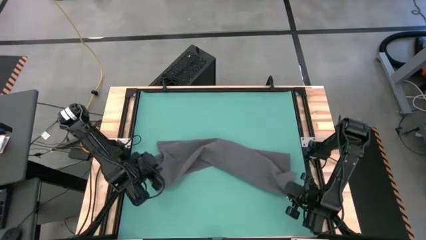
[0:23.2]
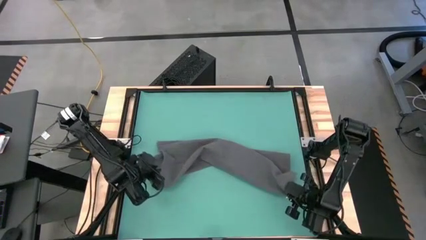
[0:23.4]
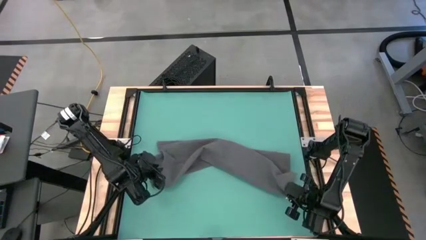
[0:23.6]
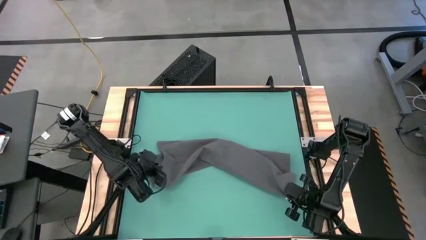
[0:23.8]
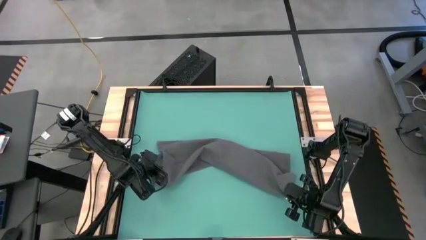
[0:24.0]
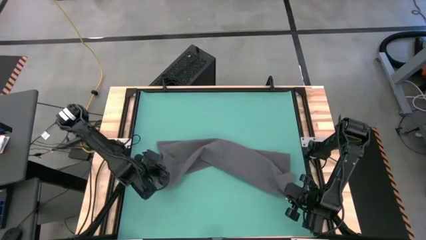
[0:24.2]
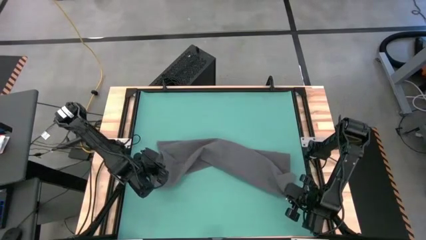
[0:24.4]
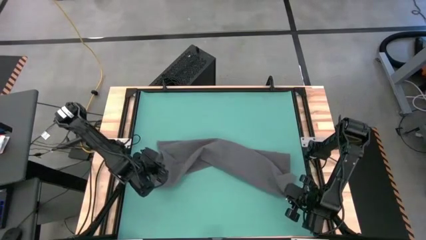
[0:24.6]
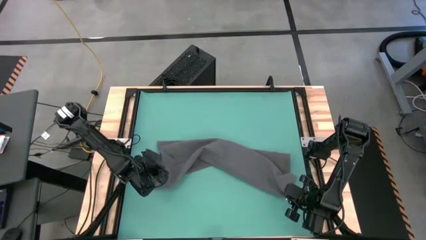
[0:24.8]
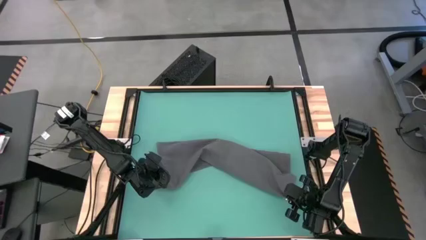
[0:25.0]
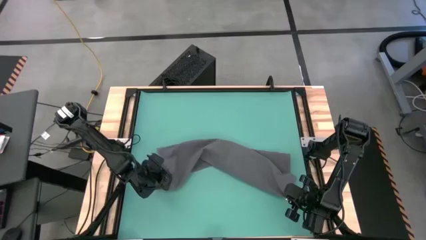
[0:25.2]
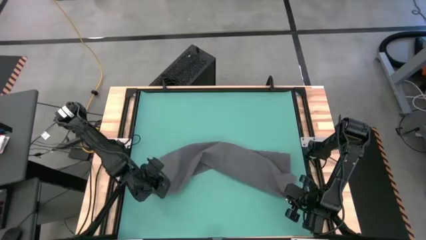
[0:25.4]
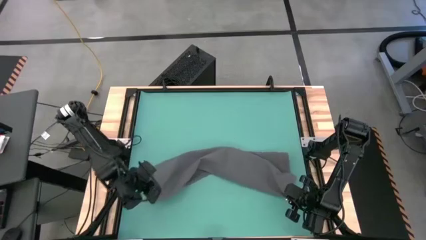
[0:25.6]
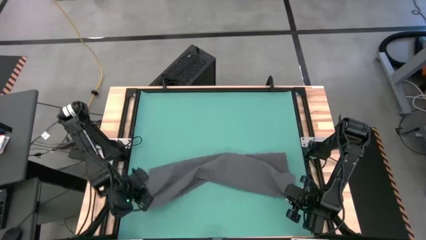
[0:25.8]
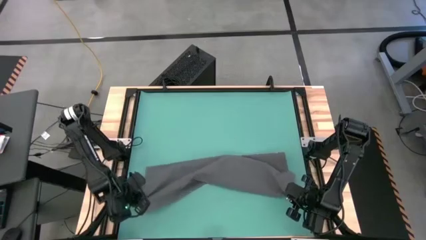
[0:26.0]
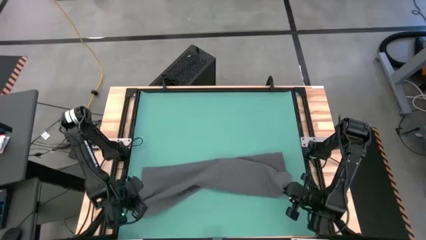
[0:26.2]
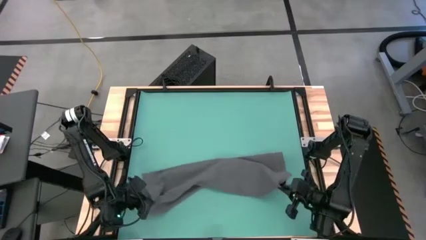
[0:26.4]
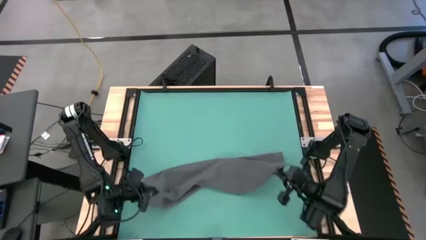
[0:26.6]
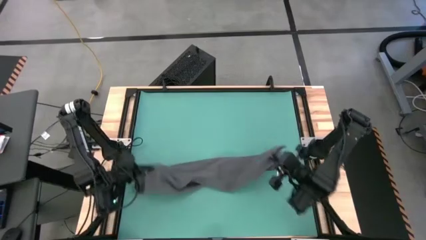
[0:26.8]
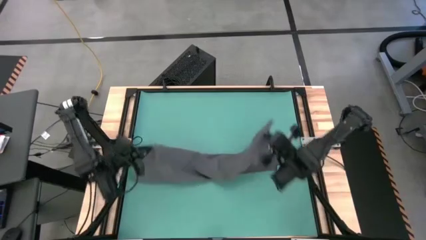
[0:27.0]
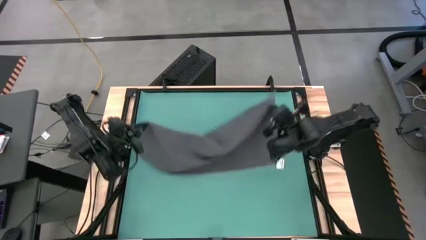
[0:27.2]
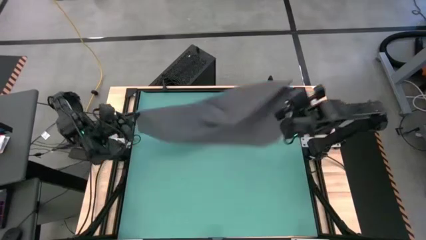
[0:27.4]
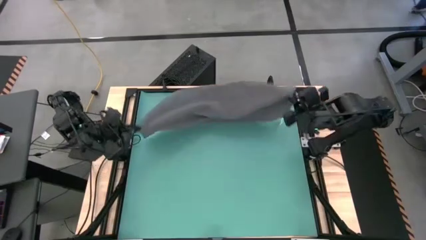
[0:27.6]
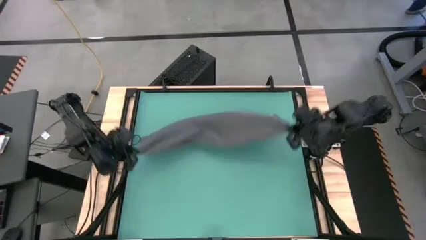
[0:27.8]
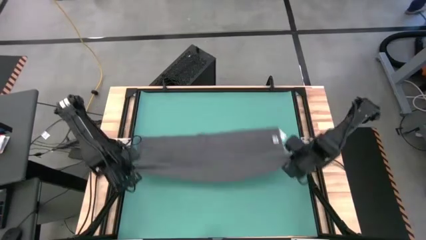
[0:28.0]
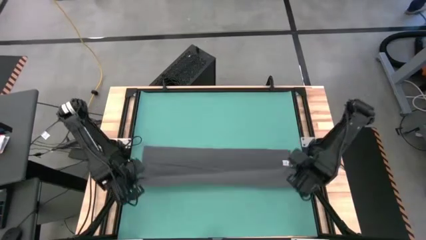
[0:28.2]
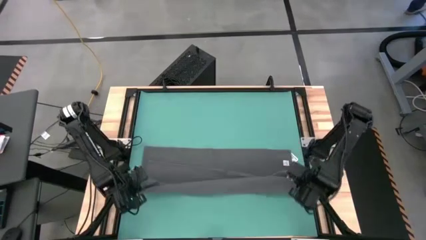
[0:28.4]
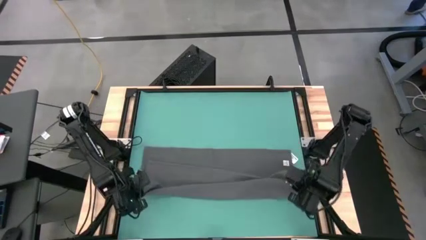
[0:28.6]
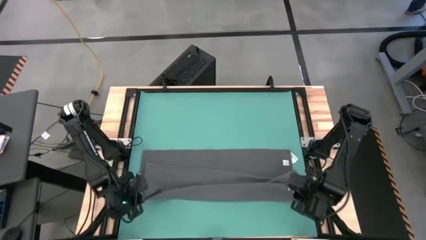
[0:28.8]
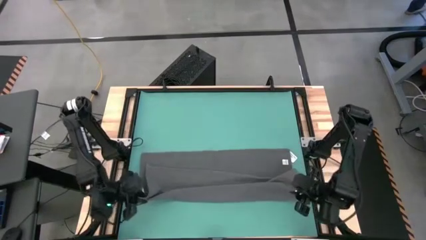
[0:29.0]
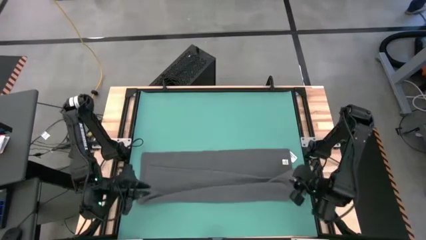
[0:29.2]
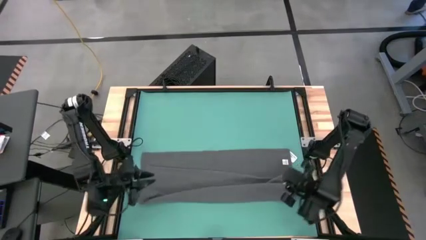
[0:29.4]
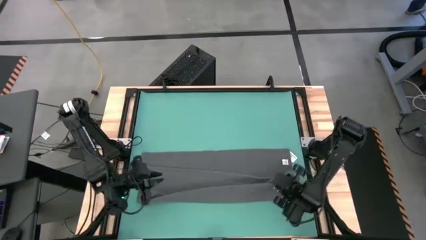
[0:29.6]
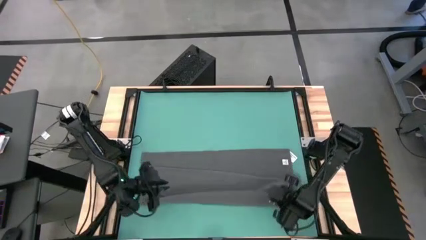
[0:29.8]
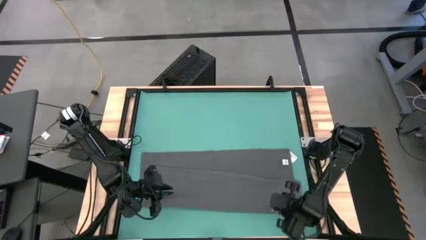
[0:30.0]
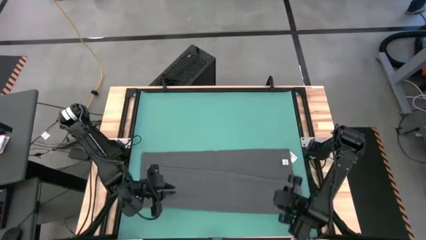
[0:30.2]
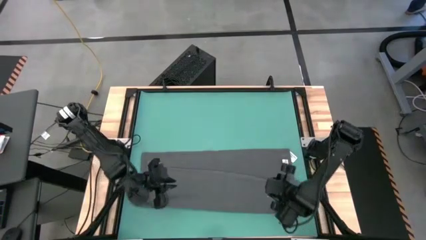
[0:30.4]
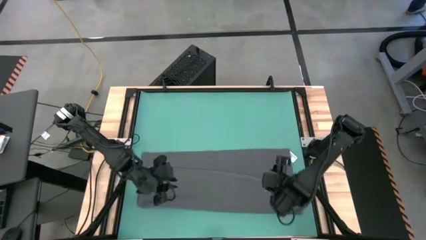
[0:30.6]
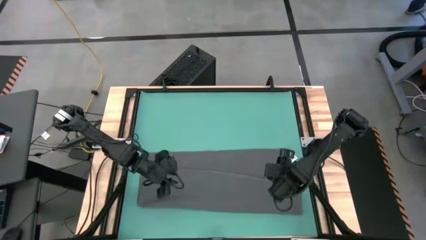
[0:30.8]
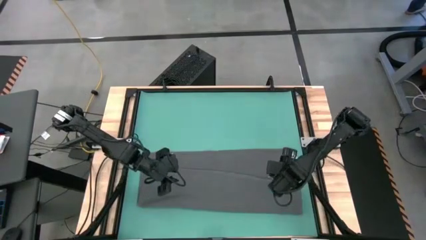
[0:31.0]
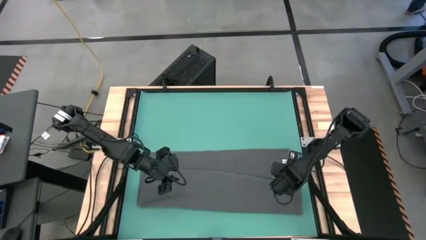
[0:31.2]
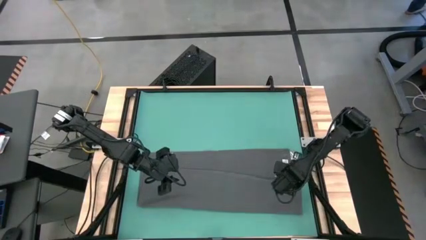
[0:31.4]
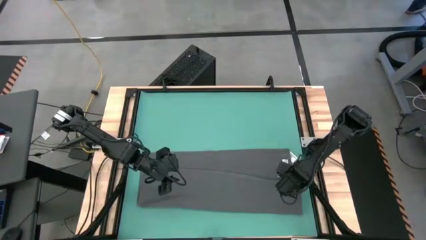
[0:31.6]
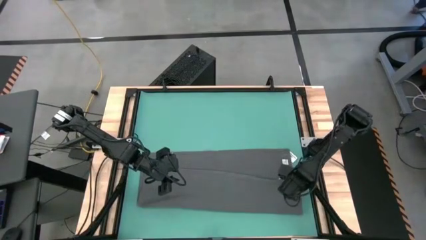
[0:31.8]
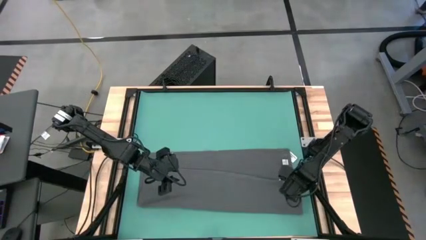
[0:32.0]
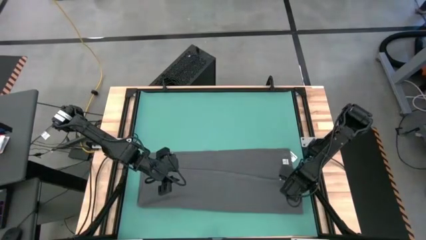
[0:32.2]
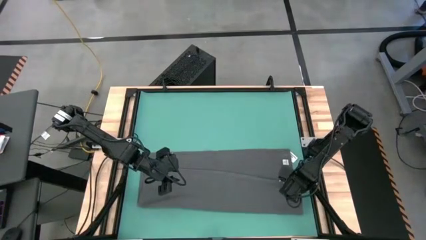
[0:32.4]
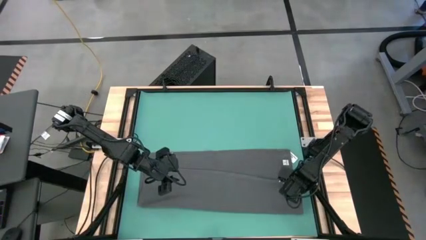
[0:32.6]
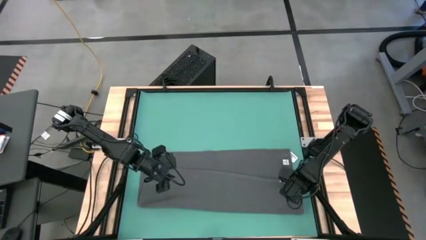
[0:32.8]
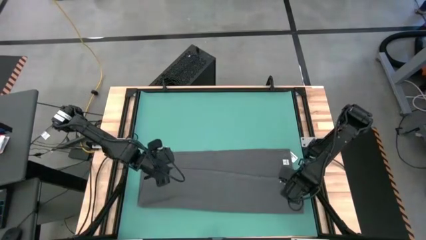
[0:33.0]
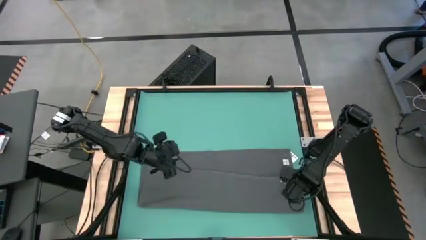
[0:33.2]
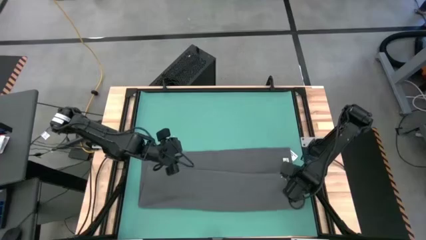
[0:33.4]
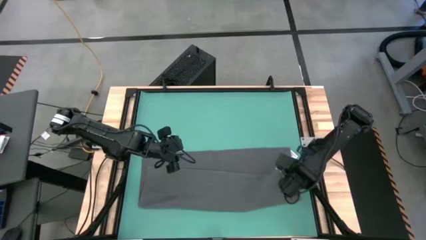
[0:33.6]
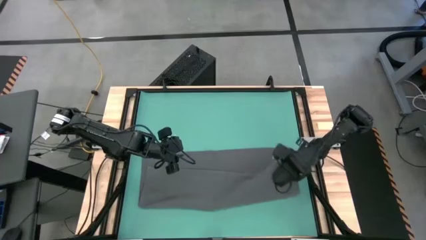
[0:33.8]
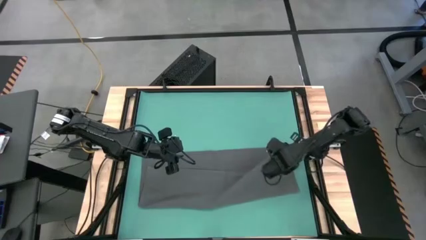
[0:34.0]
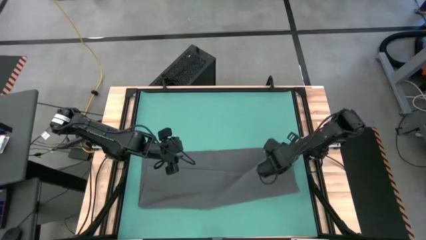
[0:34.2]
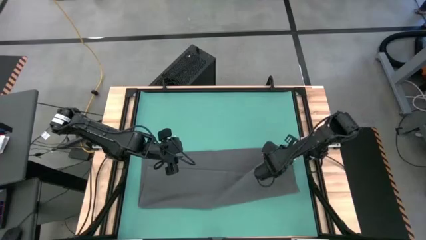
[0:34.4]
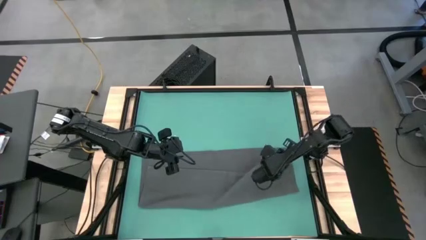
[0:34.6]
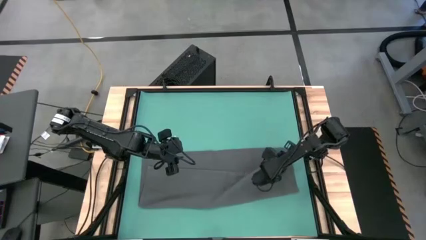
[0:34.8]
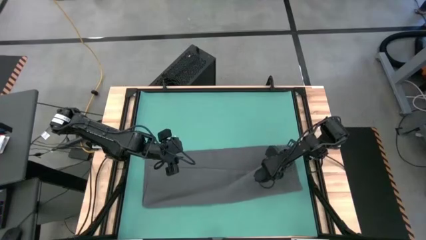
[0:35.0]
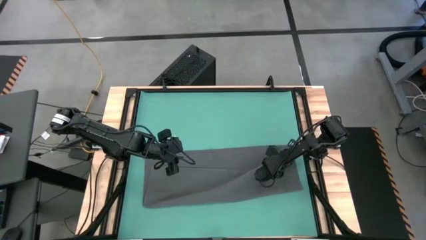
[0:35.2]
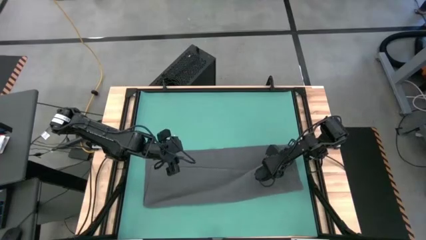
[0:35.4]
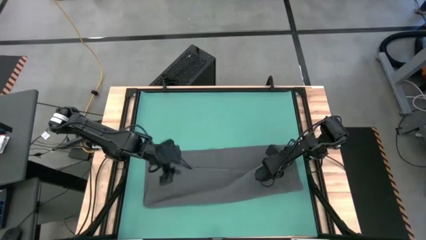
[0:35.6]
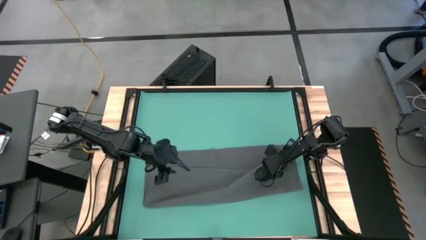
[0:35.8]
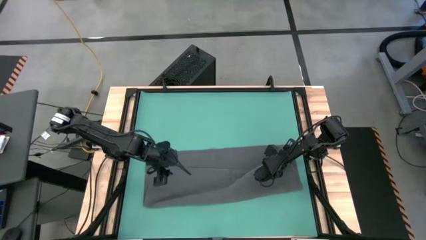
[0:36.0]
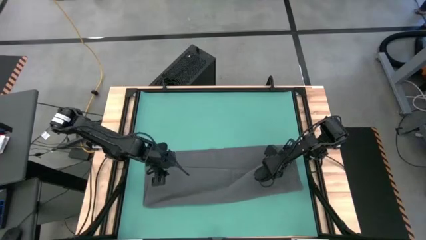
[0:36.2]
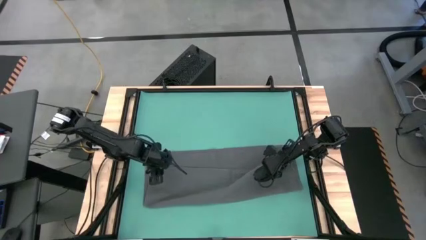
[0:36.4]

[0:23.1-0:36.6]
Task: Roll towel
Roll the gray towel

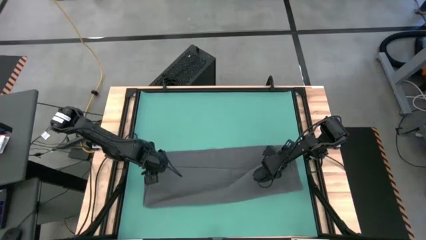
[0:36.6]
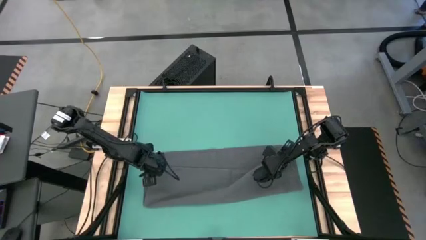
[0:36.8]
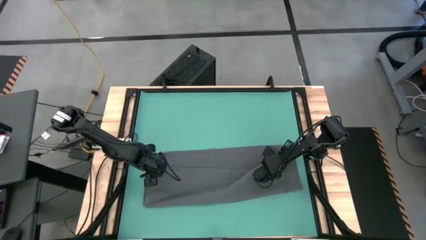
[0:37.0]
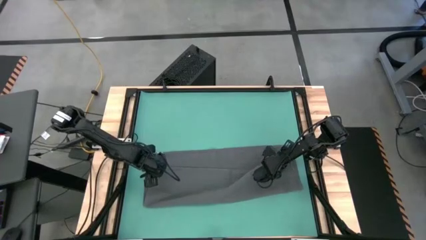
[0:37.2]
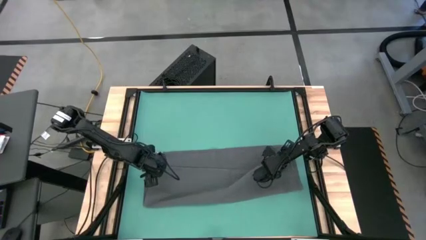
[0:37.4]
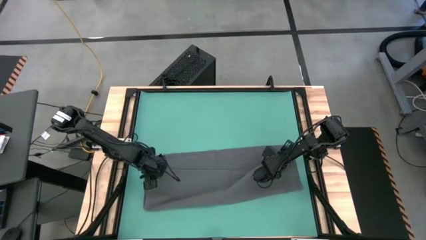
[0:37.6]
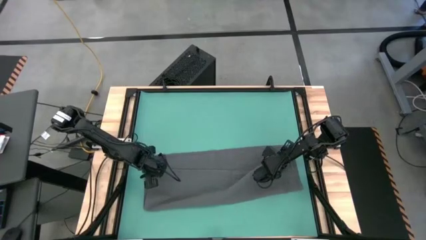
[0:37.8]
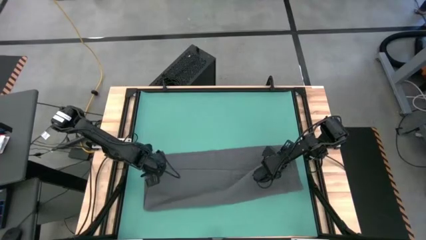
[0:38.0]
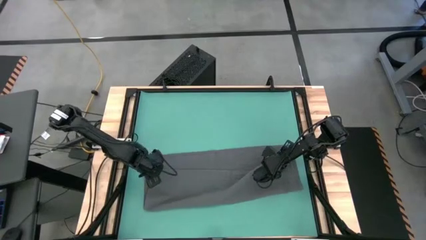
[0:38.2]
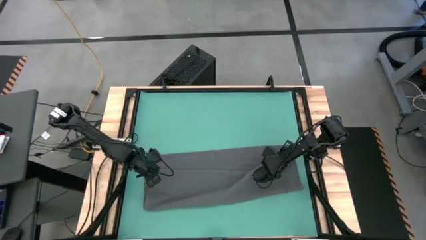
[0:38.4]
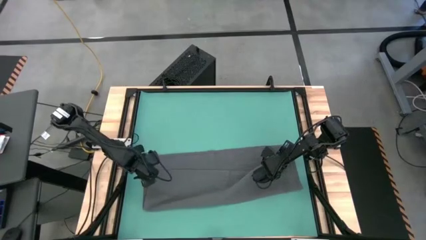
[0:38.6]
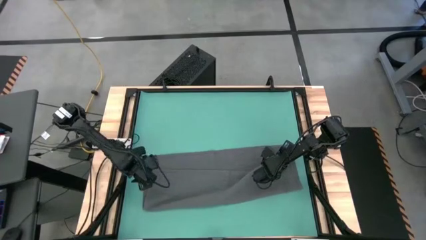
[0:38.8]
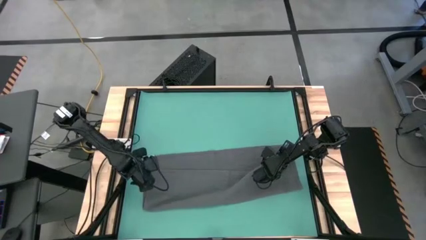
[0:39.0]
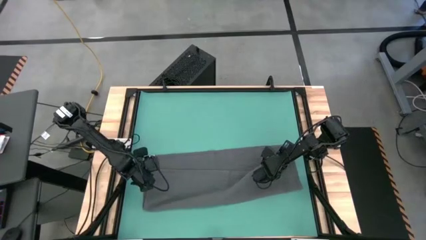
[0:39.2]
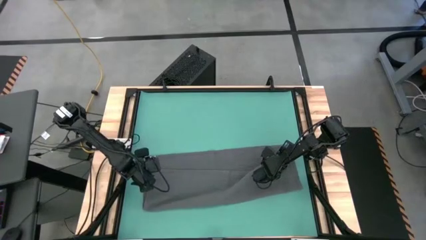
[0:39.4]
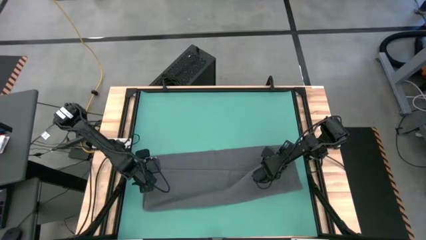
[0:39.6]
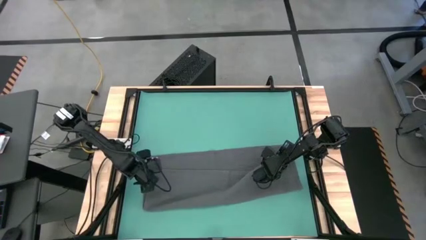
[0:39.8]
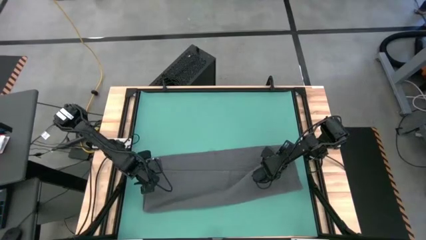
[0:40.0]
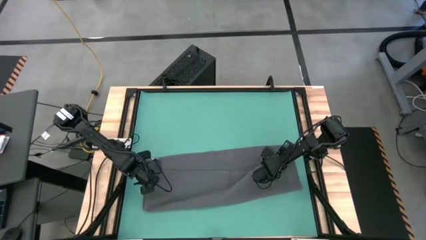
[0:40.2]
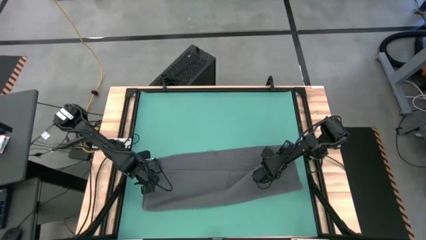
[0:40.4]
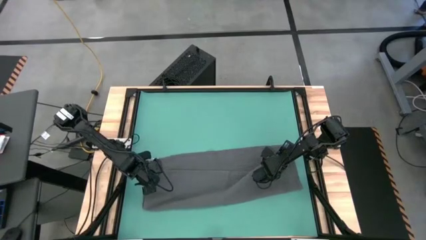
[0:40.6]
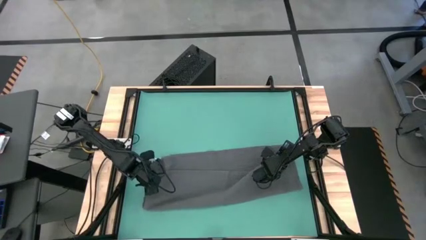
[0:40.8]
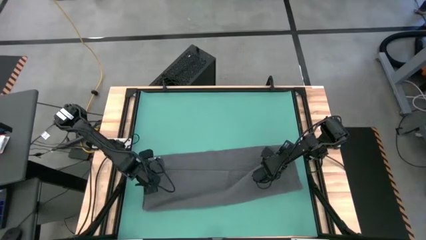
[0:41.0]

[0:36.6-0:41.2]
Roll the gray towel
